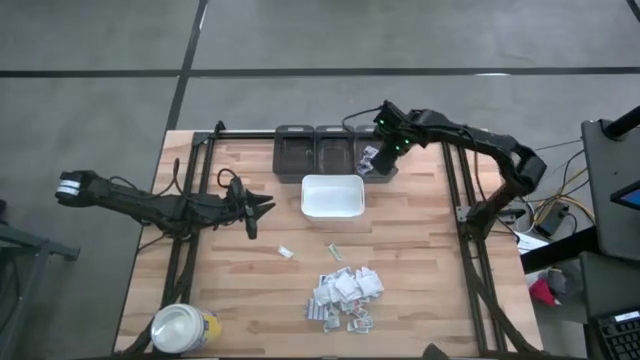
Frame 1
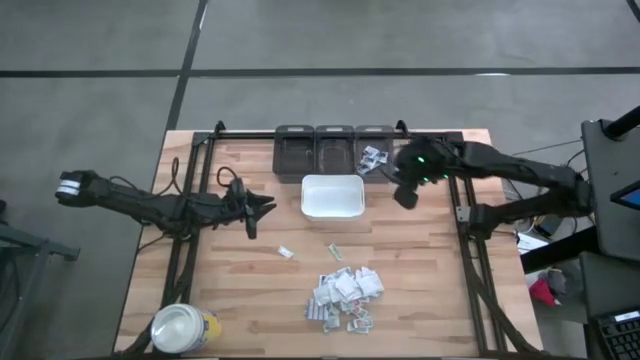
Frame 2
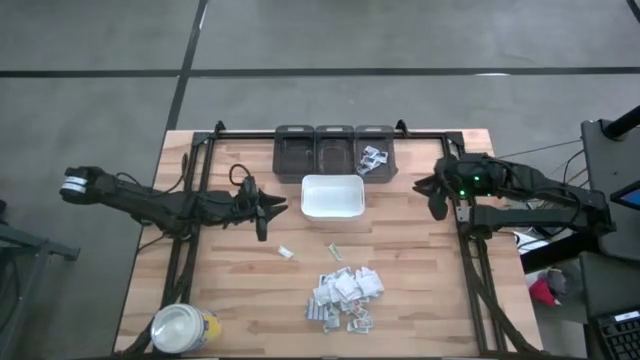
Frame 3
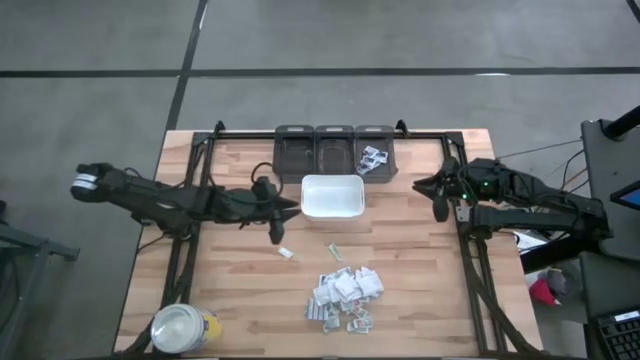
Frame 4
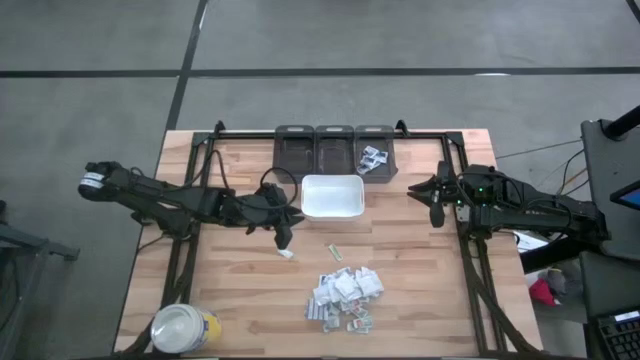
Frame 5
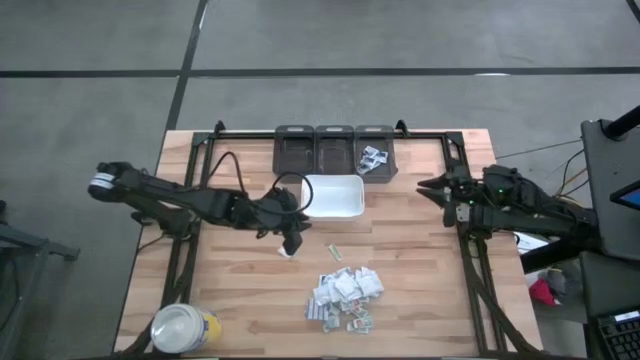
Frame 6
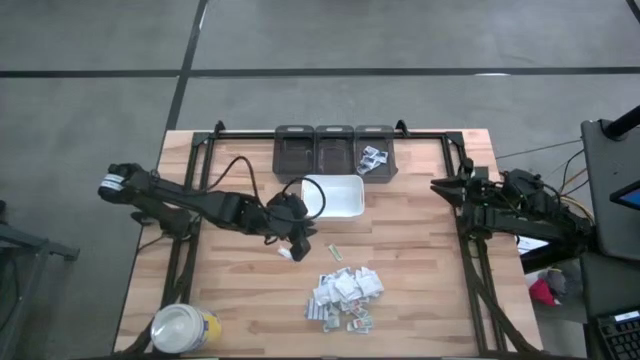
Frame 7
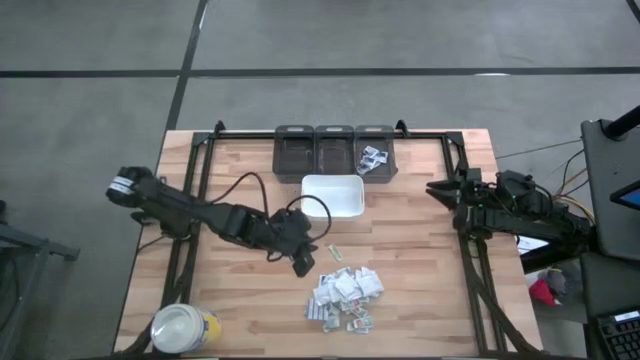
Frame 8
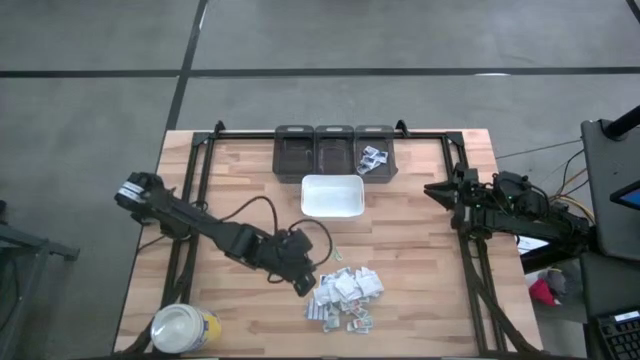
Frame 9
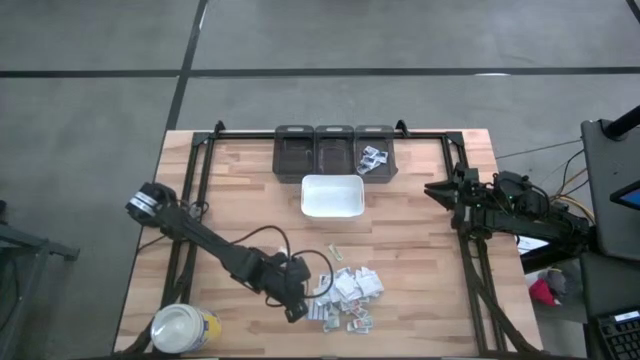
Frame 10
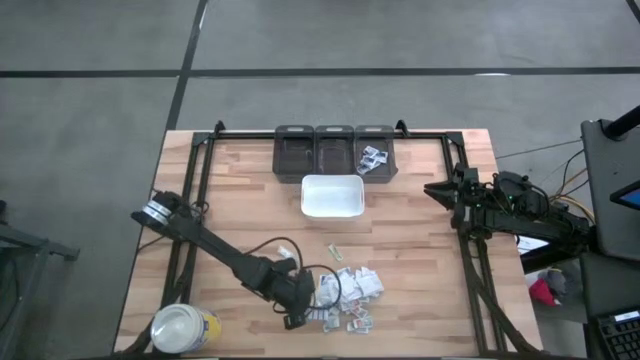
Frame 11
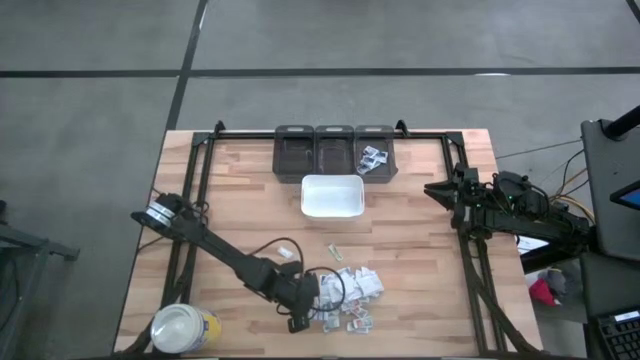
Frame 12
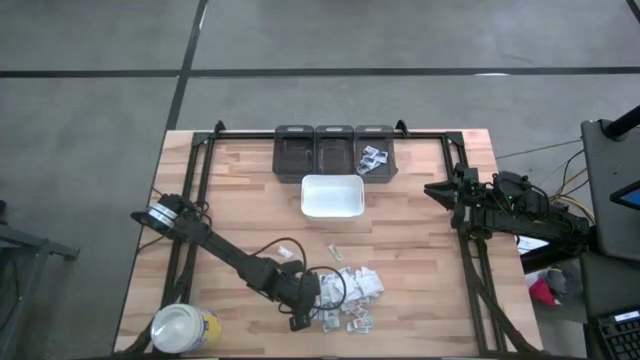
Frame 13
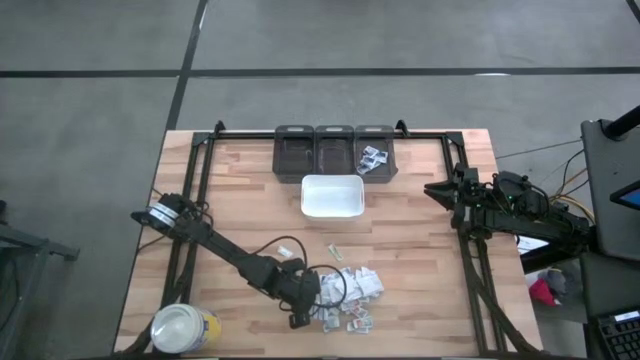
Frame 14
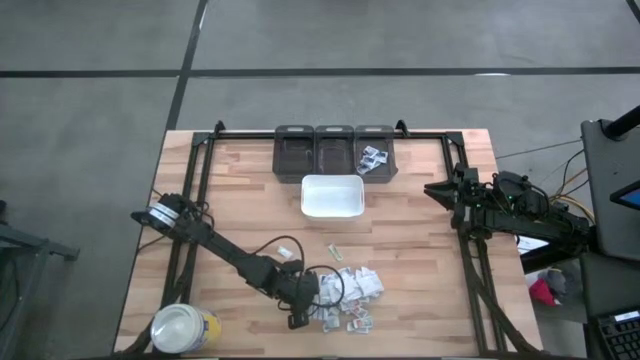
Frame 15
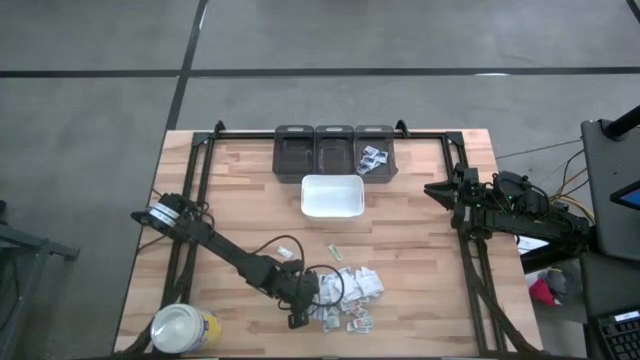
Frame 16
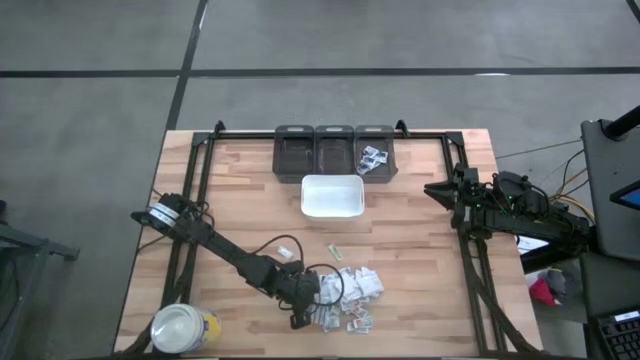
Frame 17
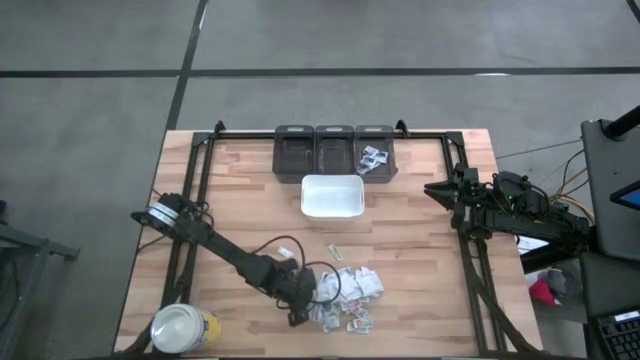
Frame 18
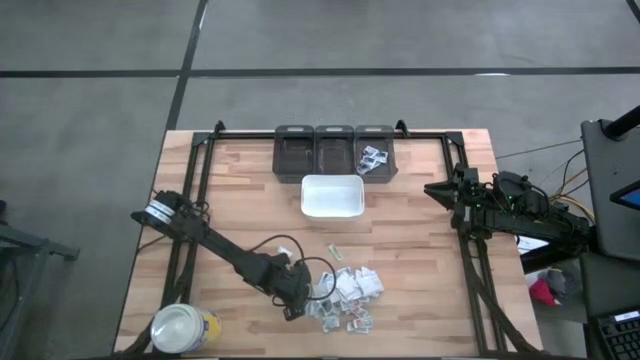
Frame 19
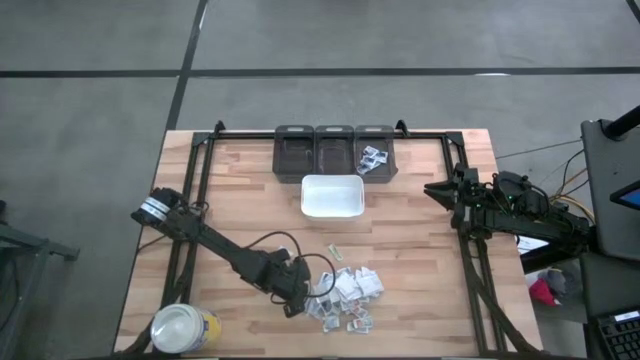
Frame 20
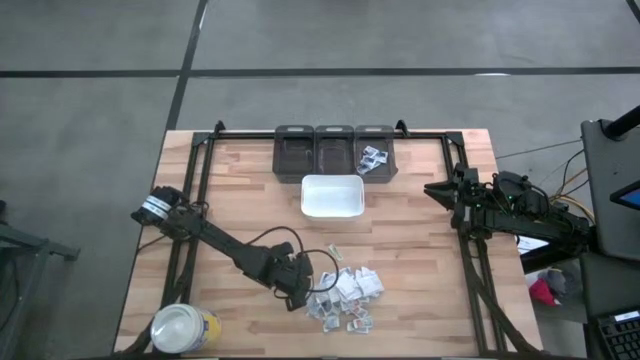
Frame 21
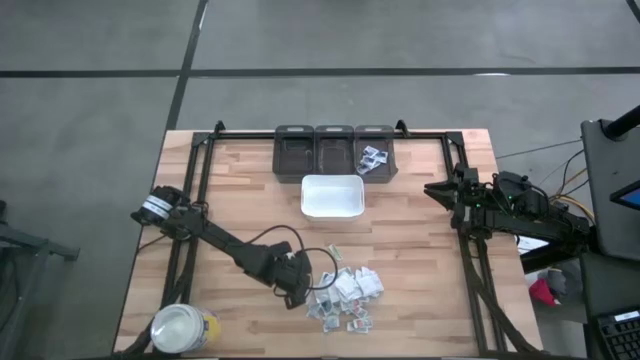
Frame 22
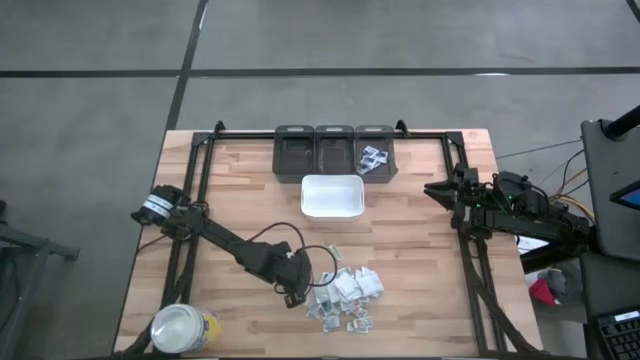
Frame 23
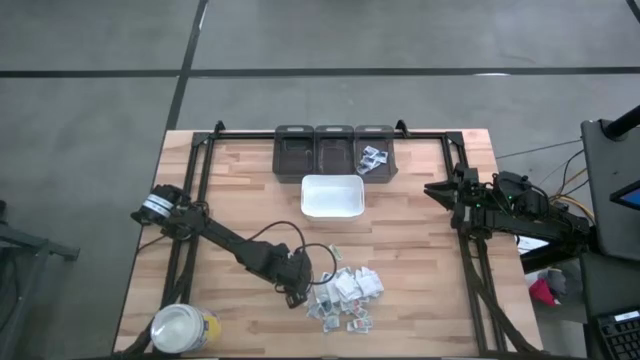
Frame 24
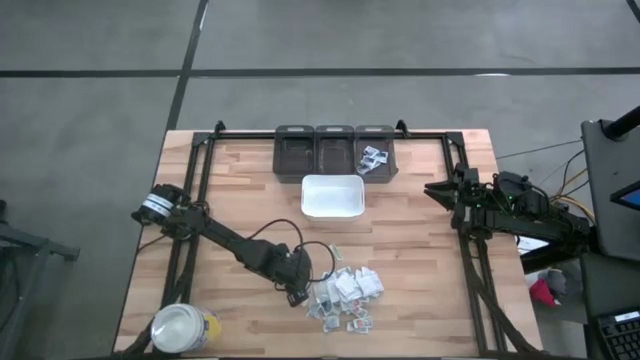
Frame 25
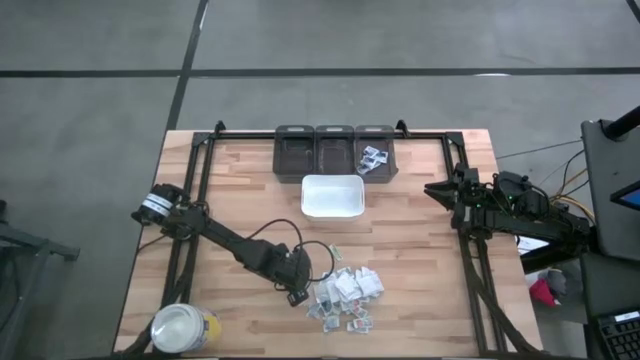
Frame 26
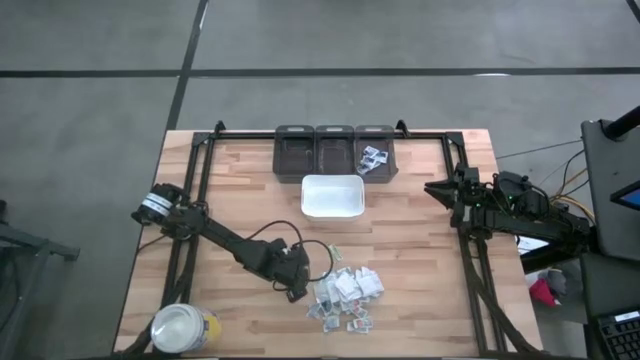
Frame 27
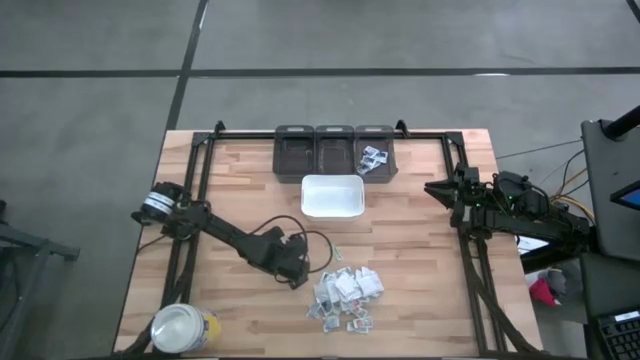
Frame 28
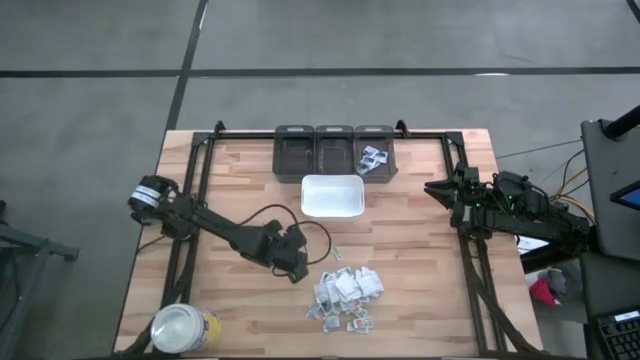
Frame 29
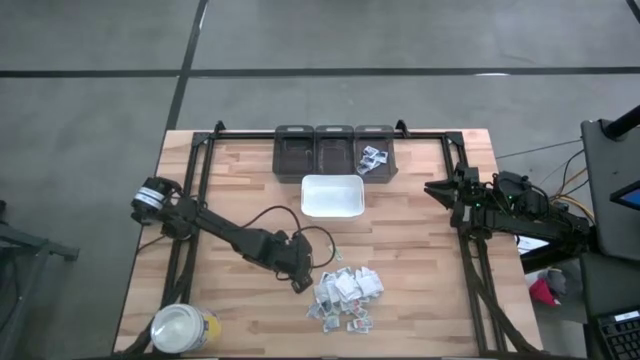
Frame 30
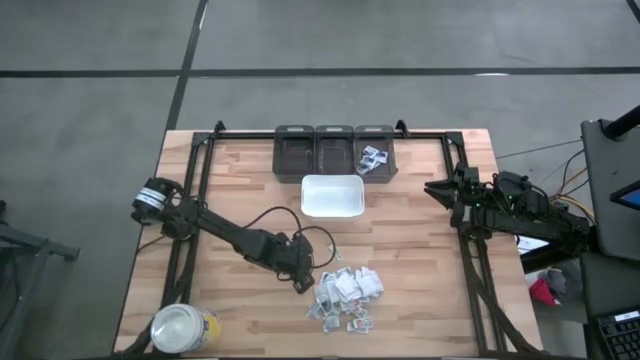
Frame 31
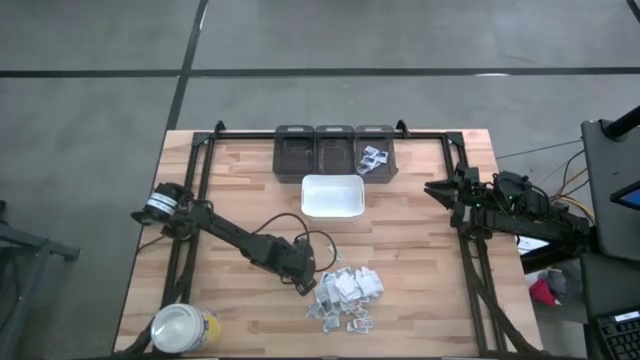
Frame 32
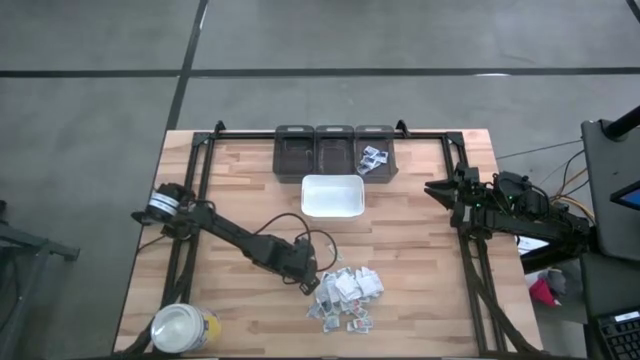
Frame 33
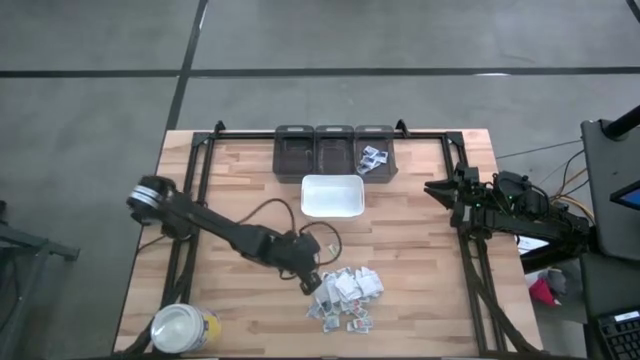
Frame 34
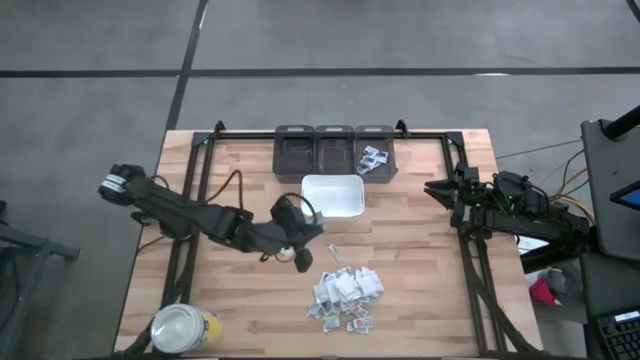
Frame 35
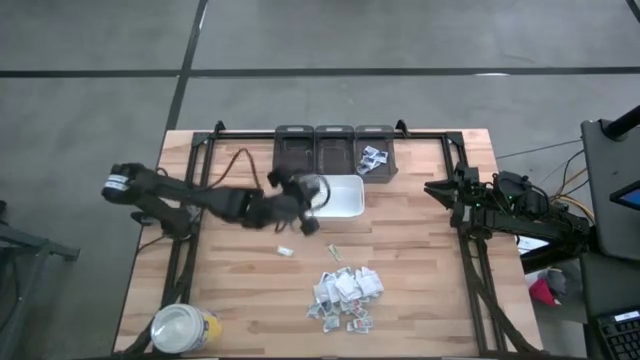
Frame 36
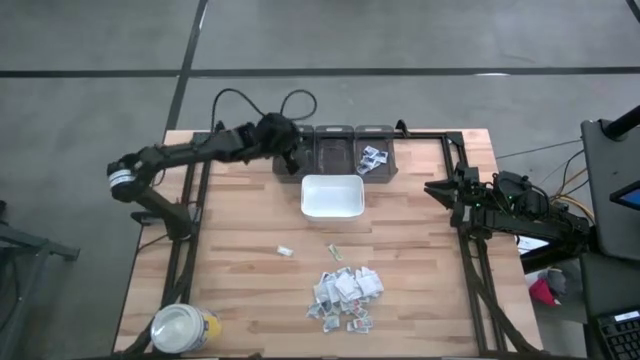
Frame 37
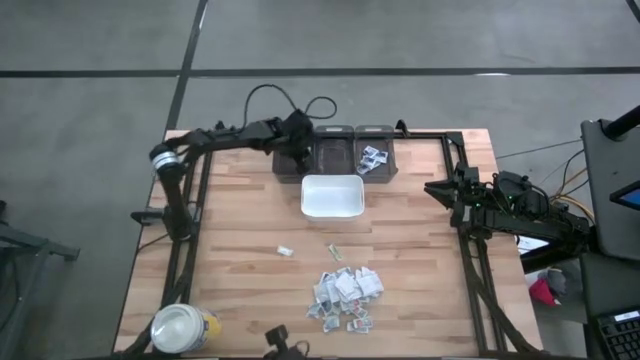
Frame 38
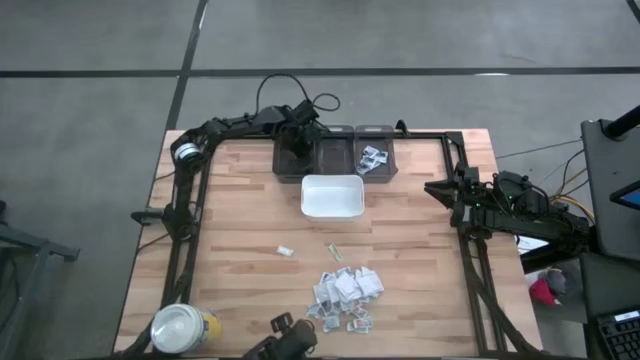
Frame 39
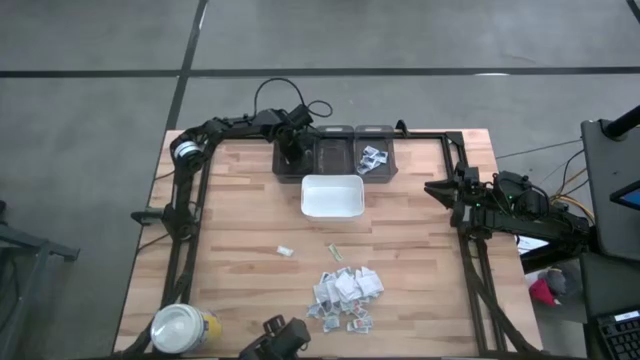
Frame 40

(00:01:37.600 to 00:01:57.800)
Task: Pick & Place First Aid Supplies
Put the white fingertip band aid into the left black bin
